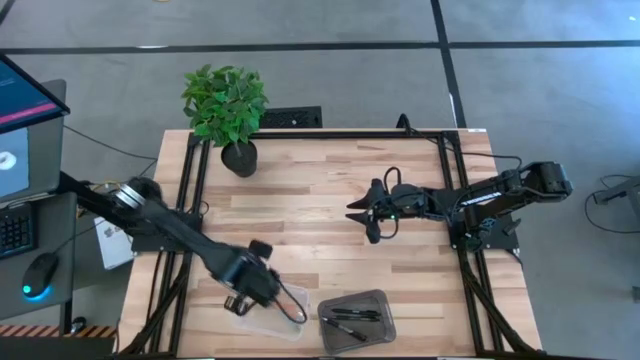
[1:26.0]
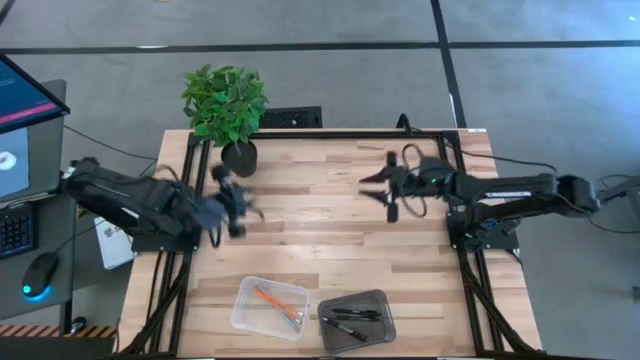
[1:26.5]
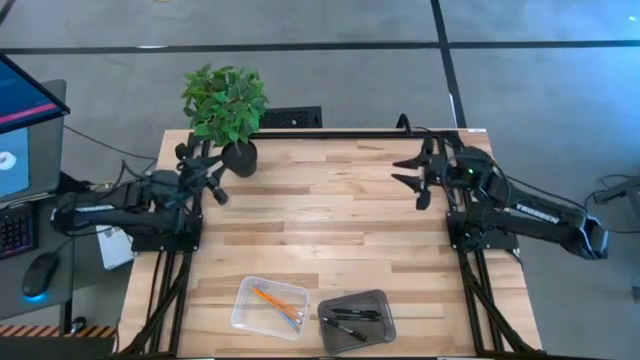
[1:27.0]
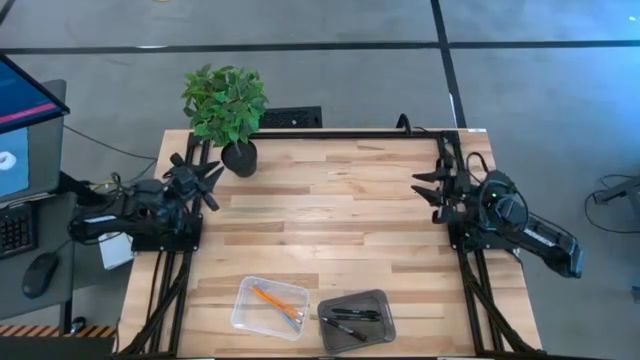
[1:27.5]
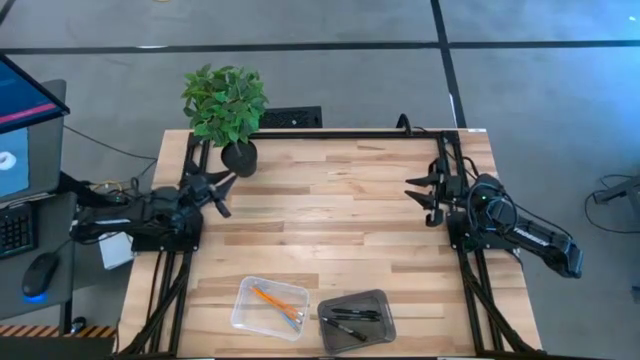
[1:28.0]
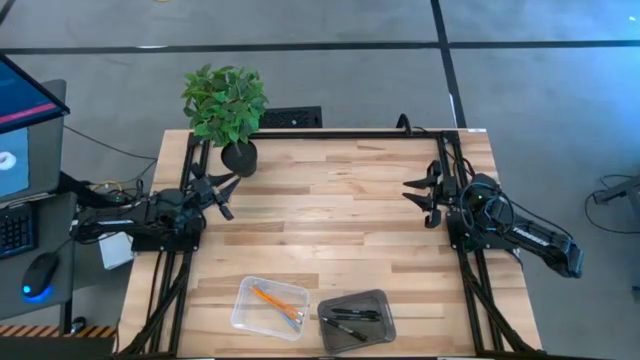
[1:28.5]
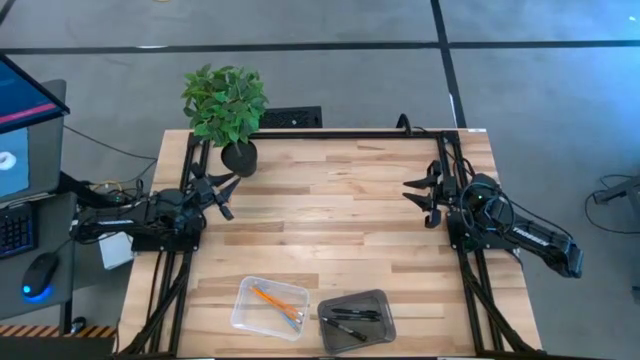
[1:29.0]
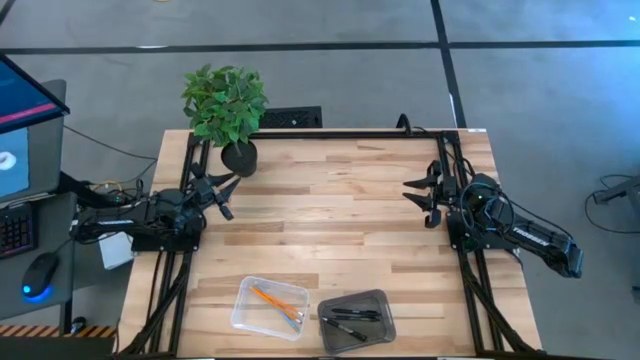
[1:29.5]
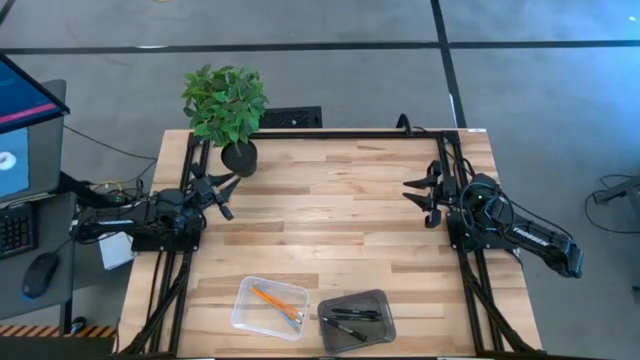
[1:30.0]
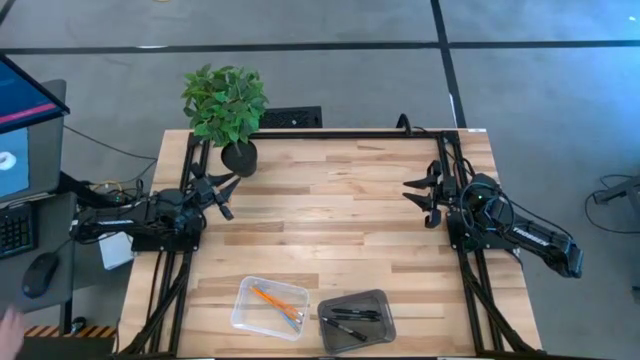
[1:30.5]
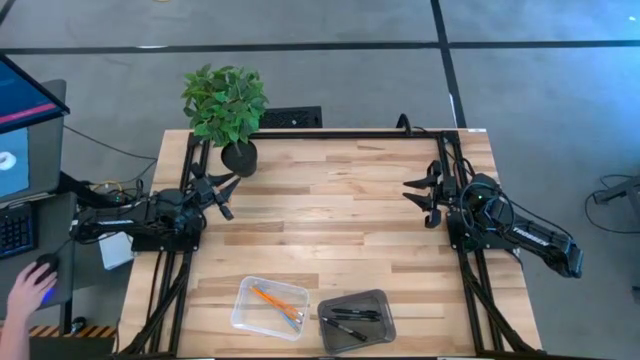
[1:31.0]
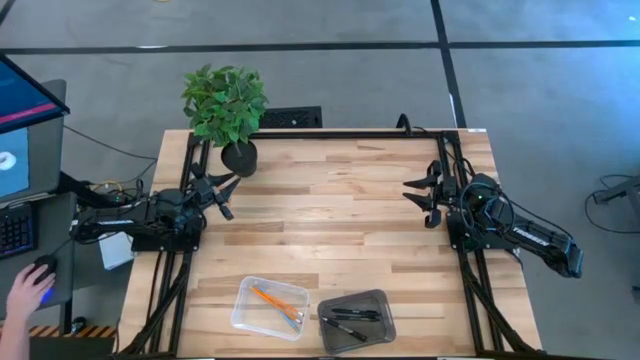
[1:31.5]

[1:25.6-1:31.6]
Task: Sort pens & pencils
Return to Home Position

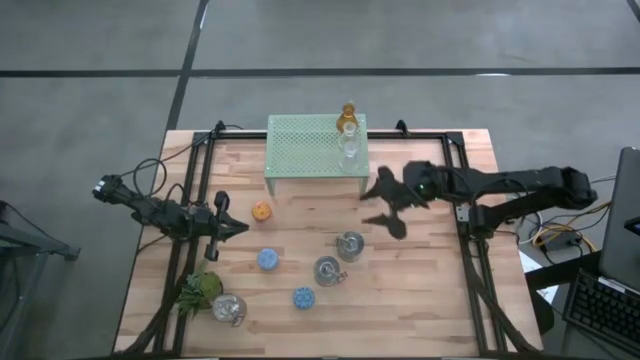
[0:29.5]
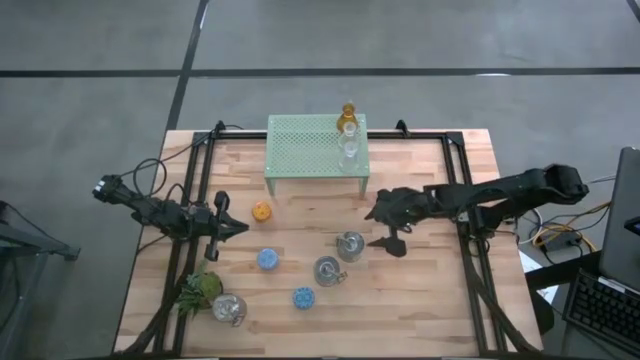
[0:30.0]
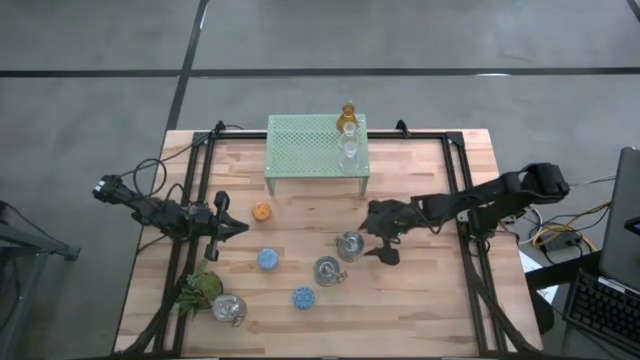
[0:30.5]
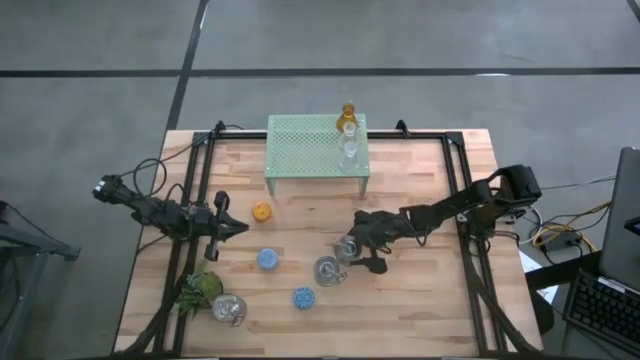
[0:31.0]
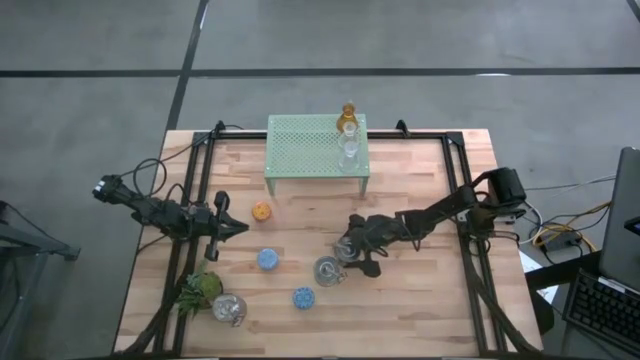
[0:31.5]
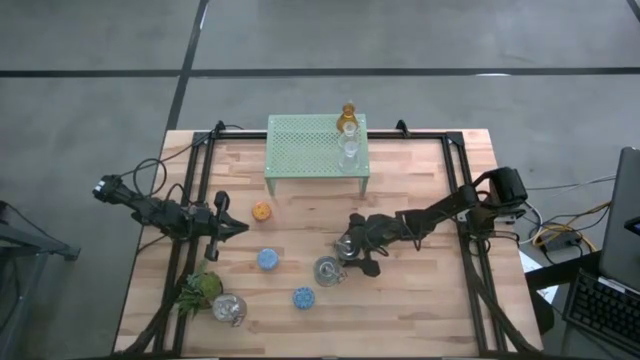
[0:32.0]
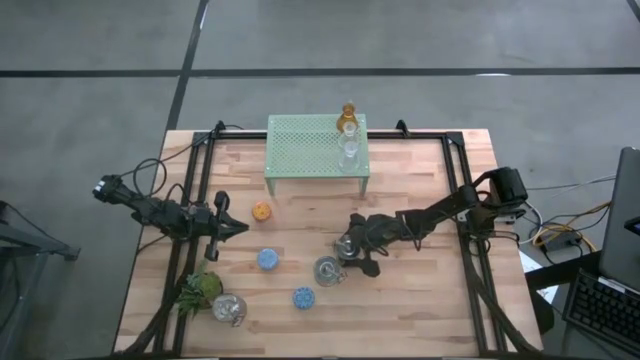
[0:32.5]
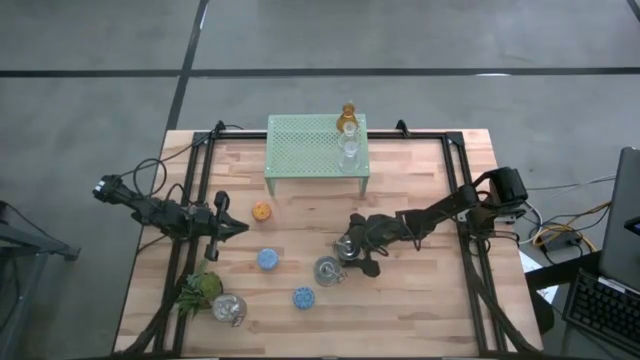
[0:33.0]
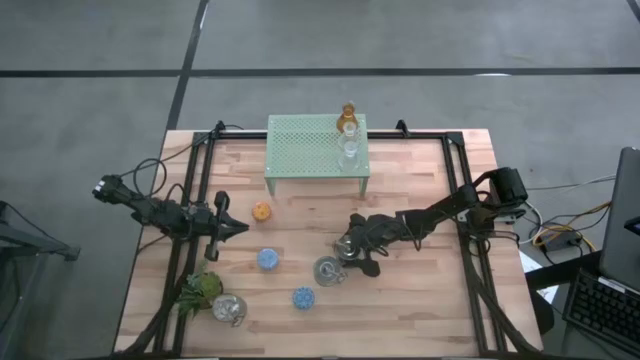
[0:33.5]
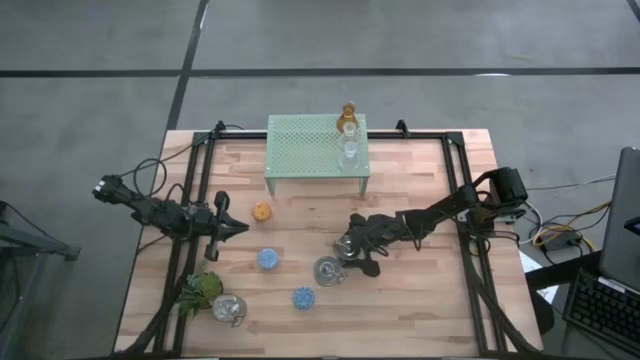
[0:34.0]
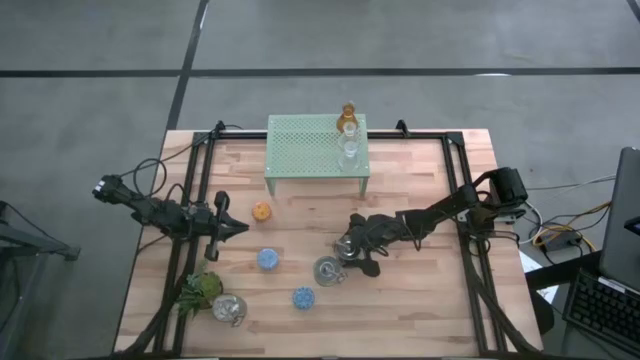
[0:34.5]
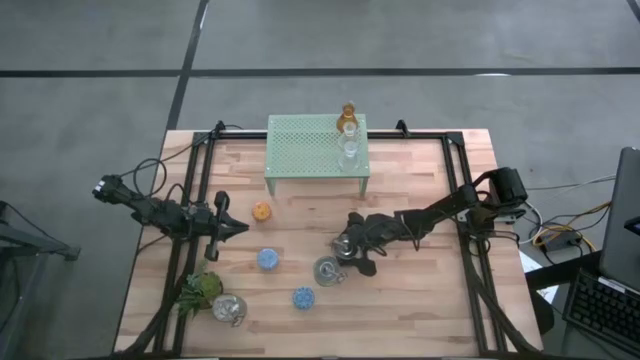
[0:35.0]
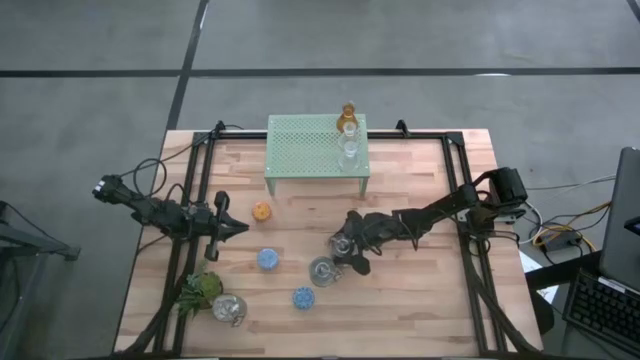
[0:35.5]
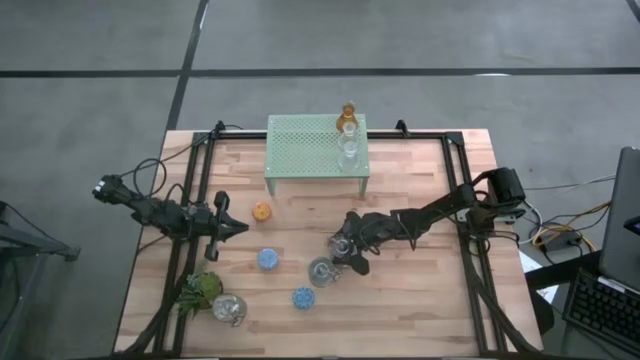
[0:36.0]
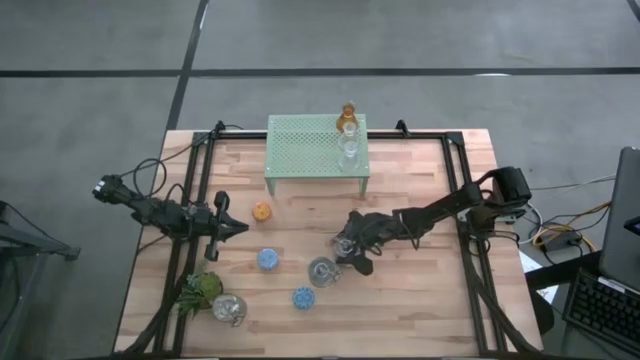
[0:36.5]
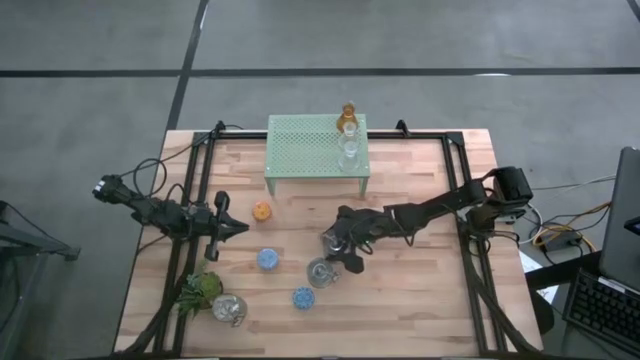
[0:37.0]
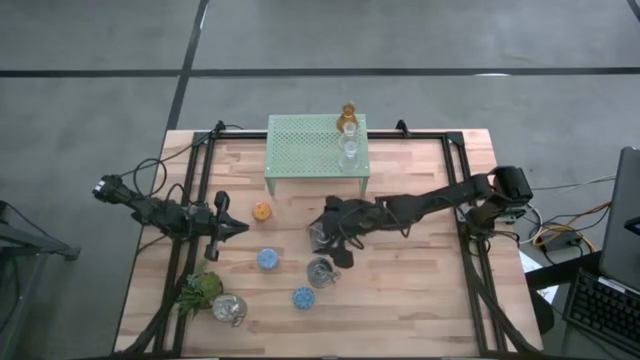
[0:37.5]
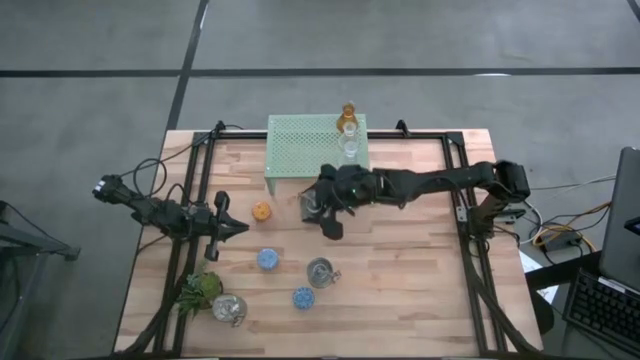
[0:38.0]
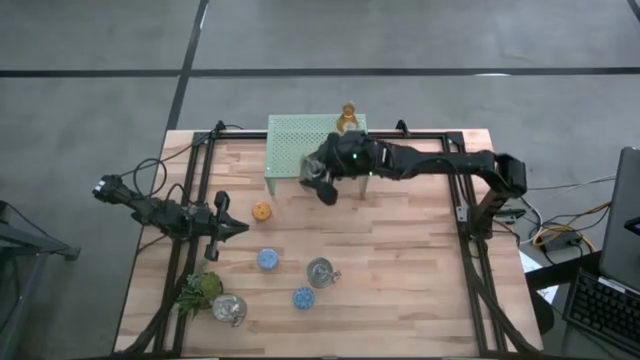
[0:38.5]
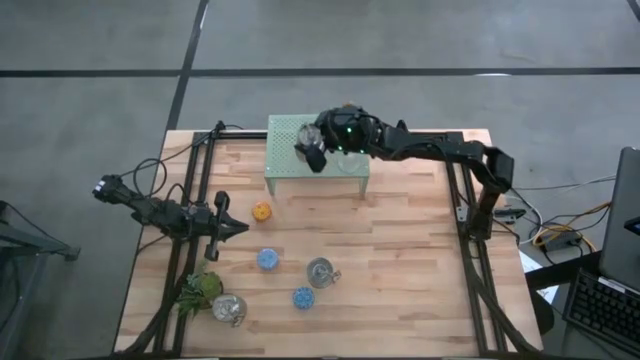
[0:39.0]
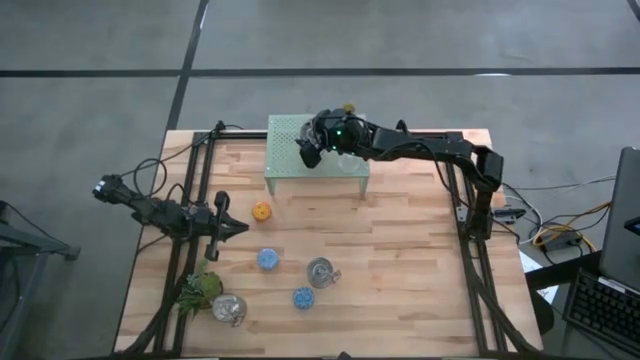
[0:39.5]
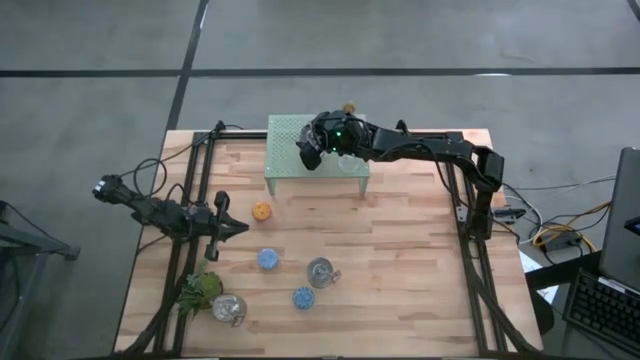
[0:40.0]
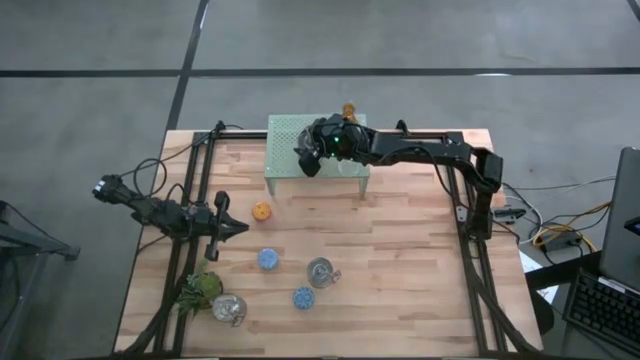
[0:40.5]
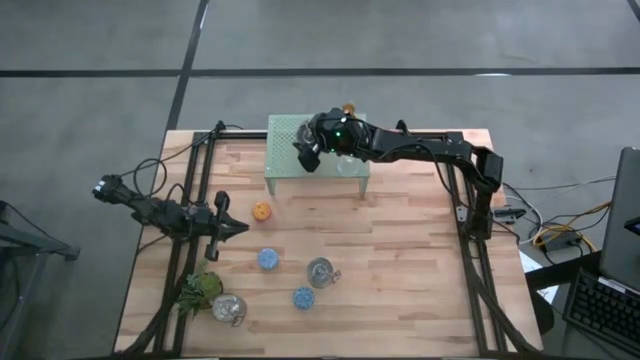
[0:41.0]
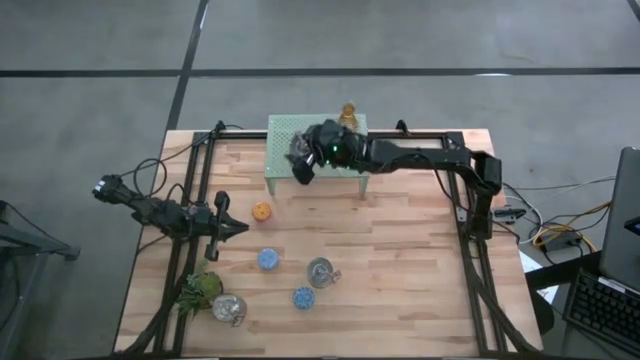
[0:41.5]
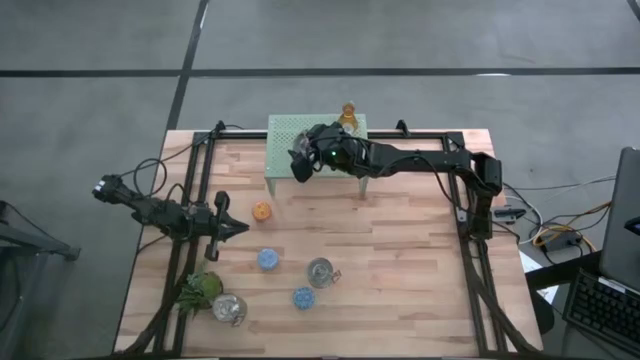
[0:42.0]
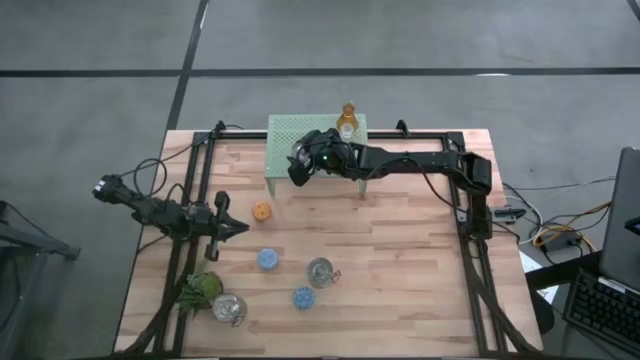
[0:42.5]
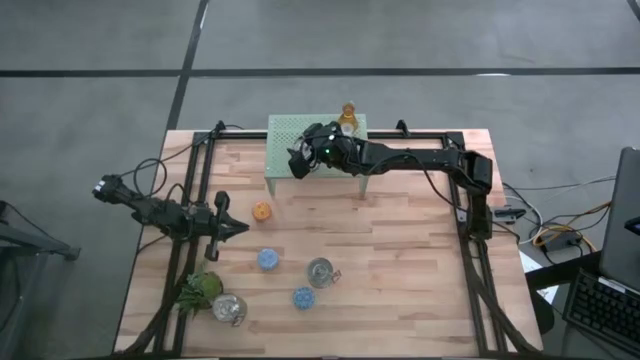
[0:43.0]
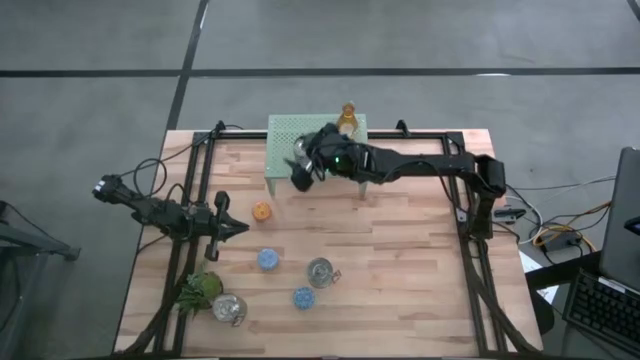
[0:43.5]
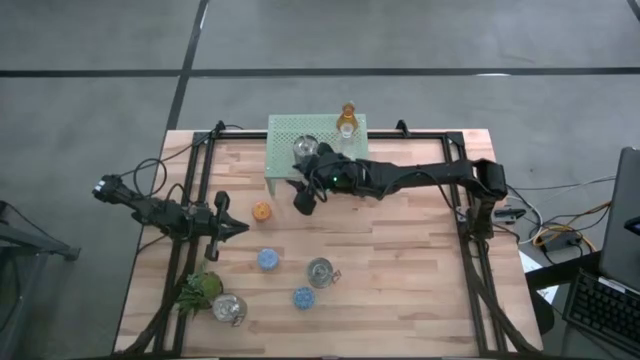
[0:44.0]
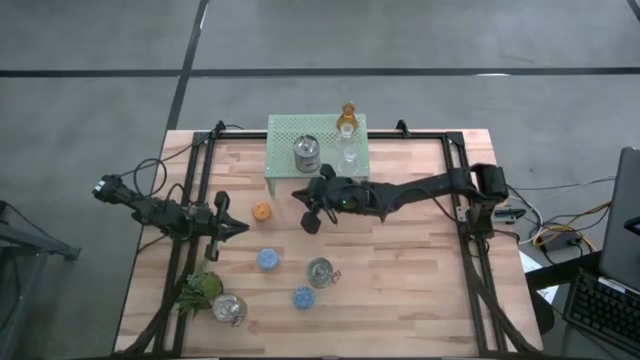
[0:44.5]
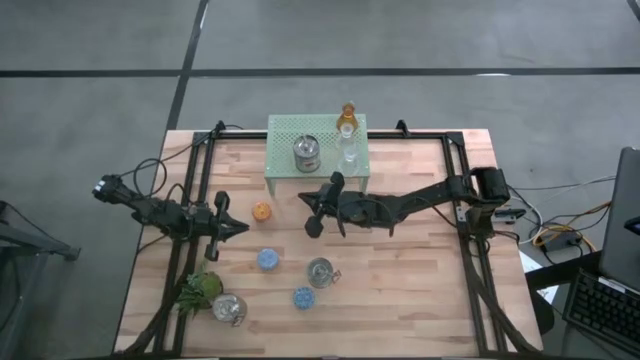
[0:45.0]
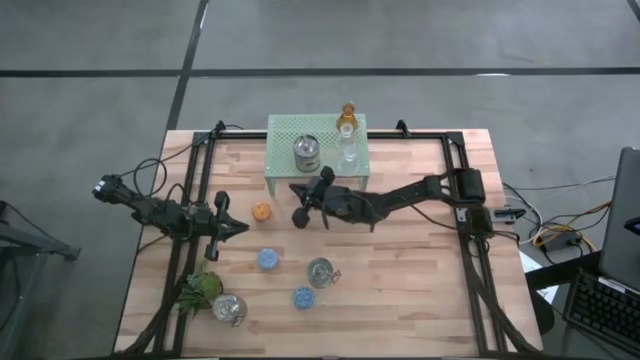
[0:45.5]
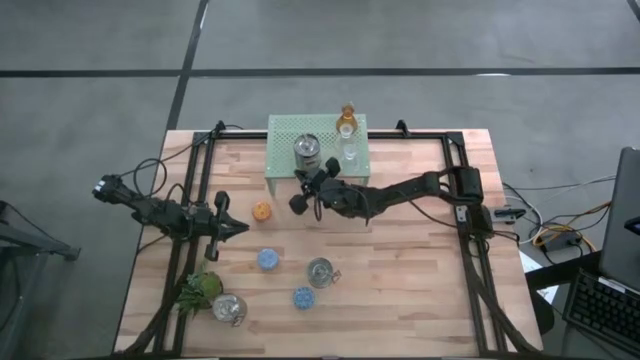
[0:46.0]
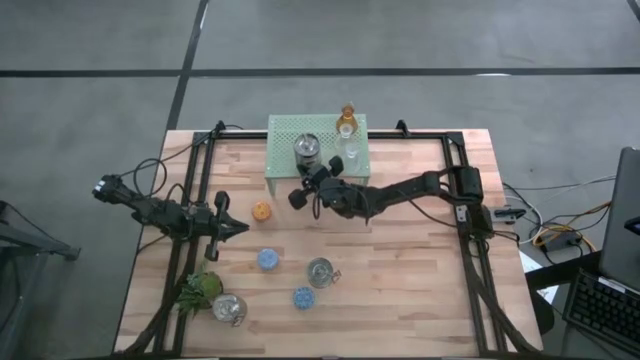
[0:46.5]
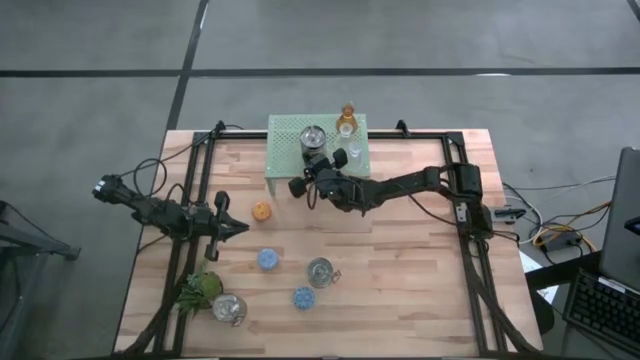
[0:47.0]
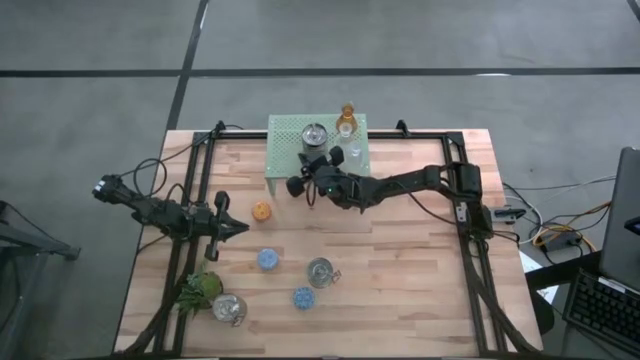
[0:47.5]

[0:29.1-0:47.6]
Task: Pick & Place candle stick holders
Put the green scented candle on the shelf
